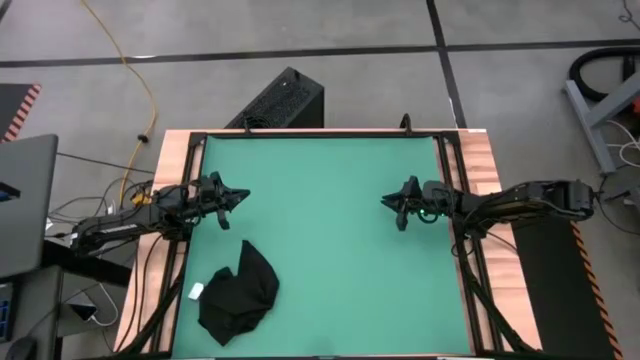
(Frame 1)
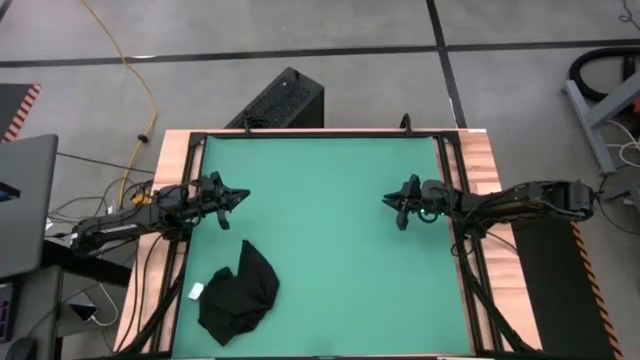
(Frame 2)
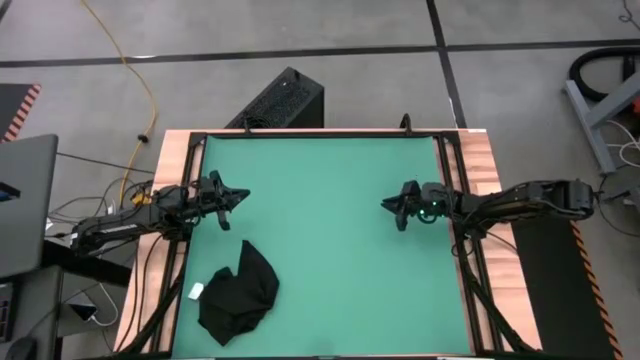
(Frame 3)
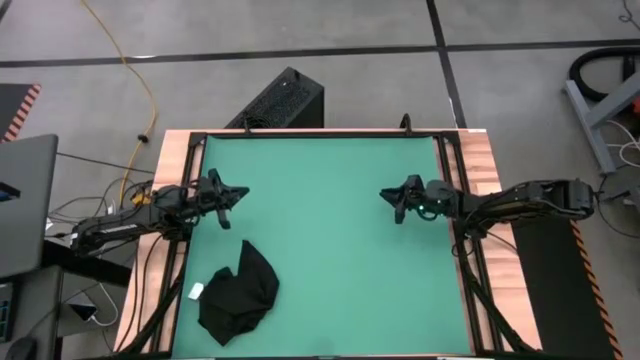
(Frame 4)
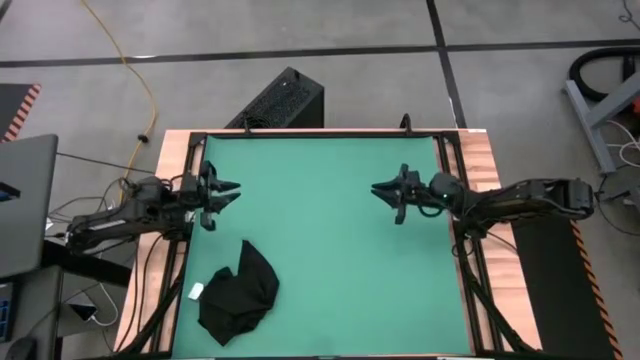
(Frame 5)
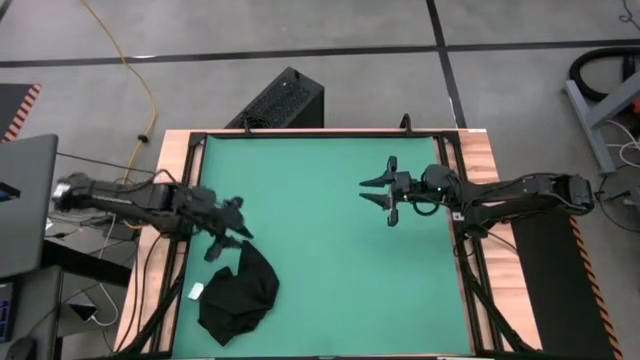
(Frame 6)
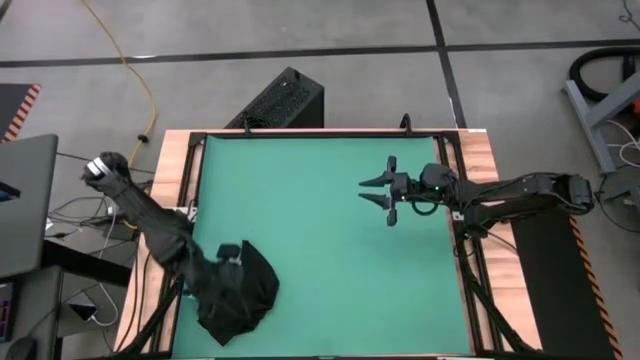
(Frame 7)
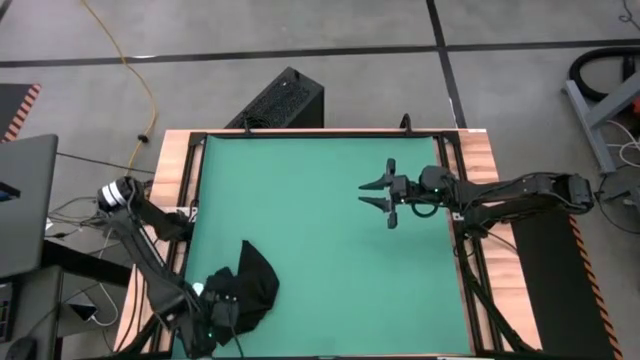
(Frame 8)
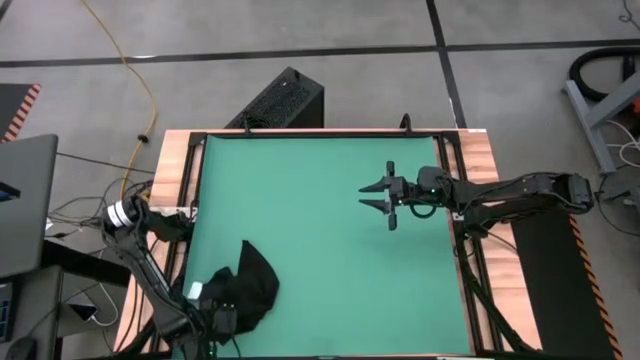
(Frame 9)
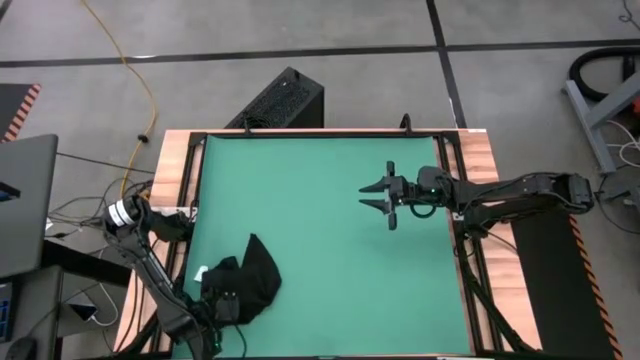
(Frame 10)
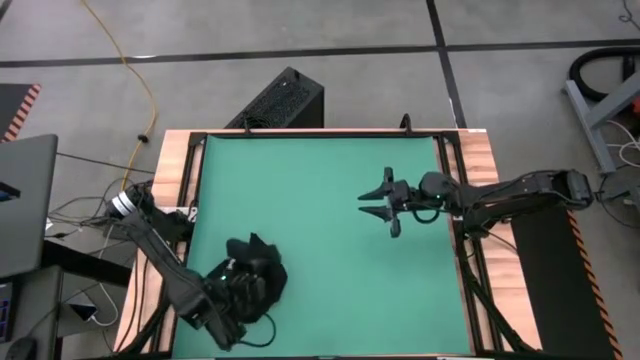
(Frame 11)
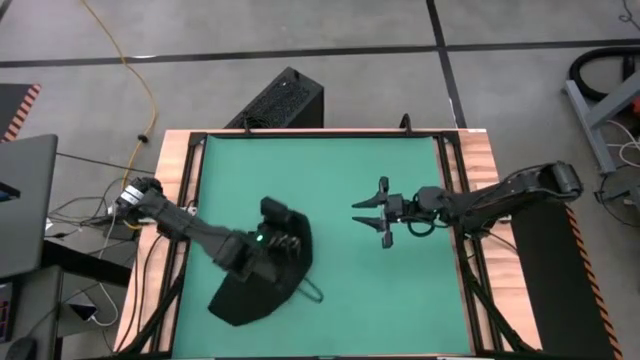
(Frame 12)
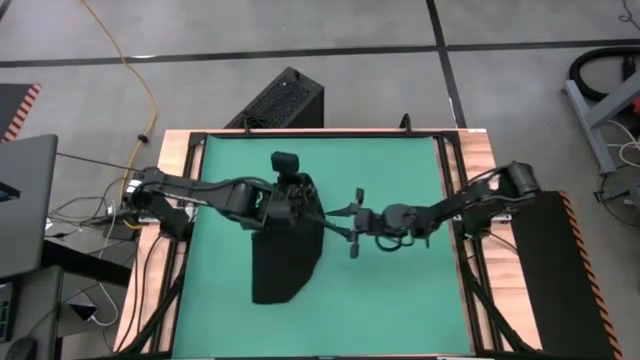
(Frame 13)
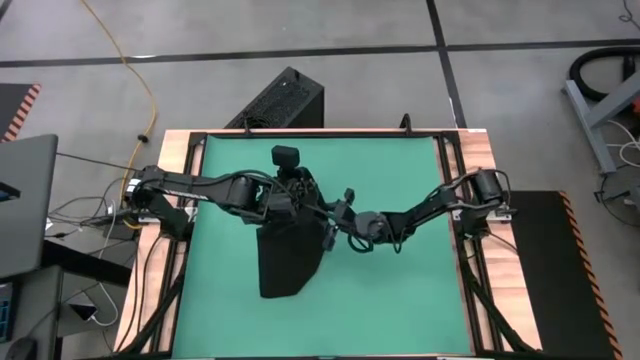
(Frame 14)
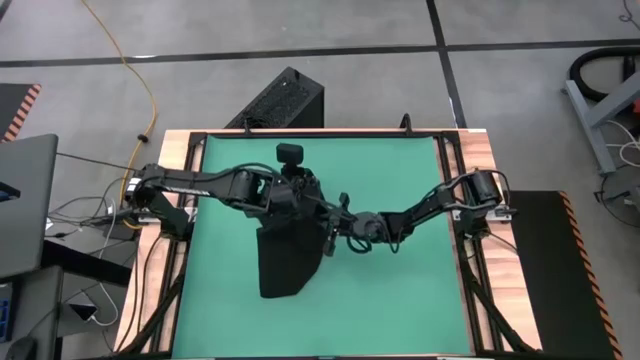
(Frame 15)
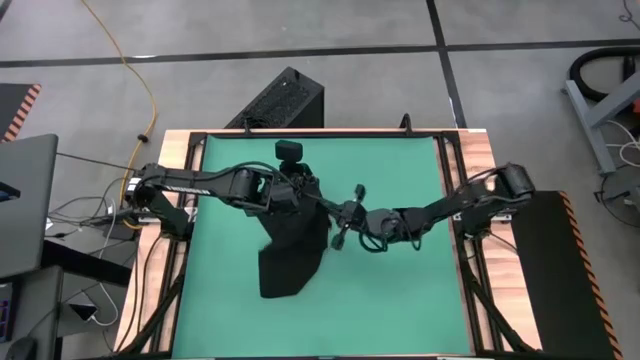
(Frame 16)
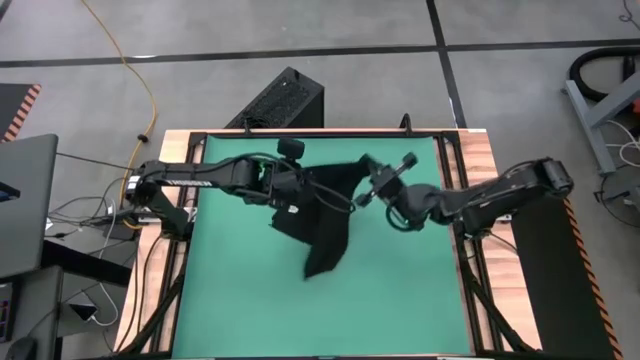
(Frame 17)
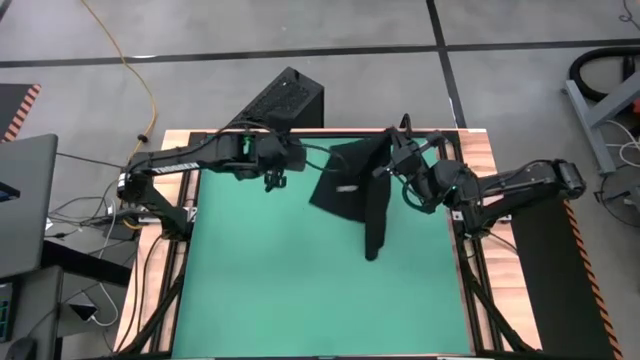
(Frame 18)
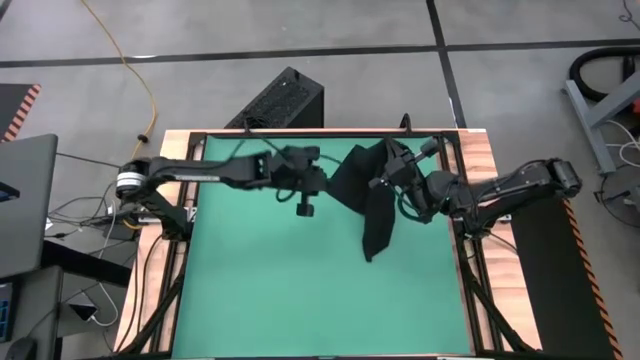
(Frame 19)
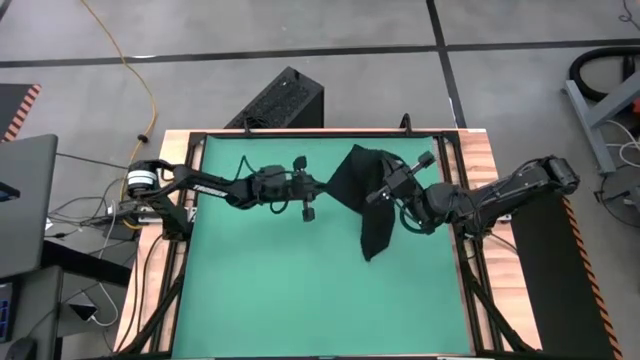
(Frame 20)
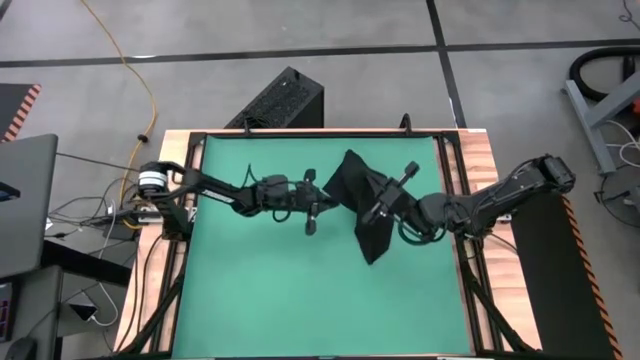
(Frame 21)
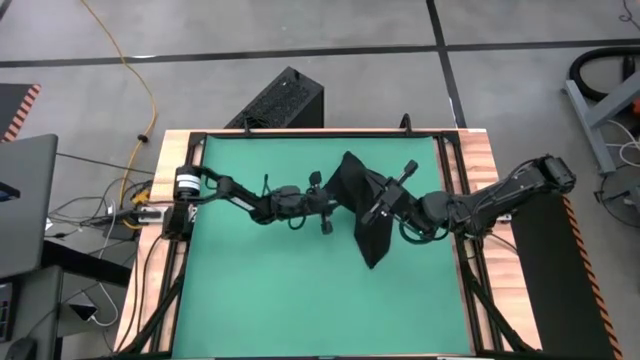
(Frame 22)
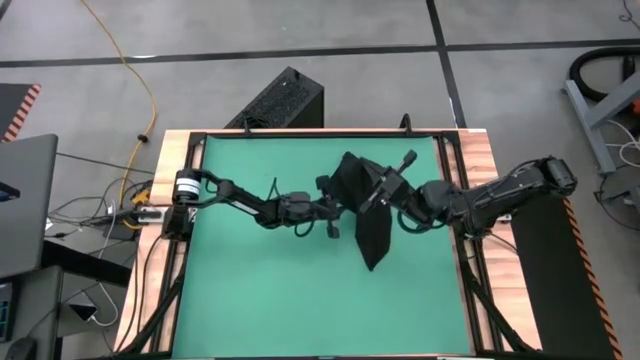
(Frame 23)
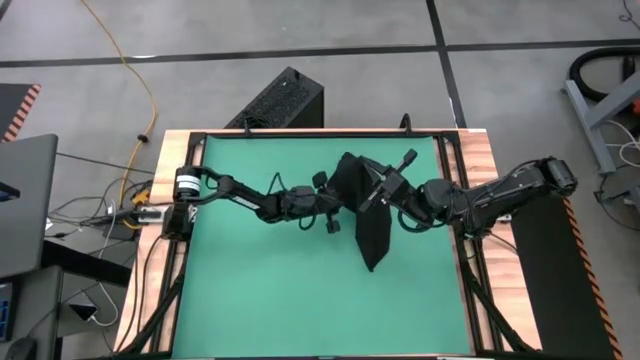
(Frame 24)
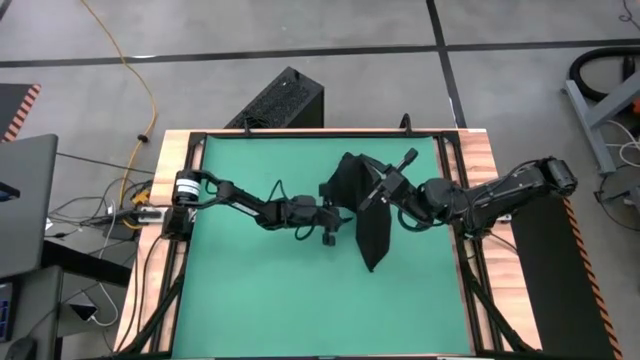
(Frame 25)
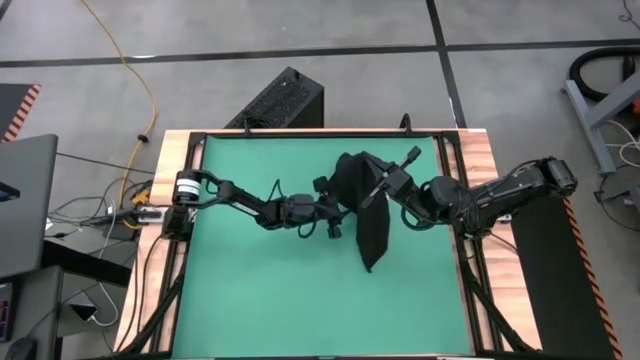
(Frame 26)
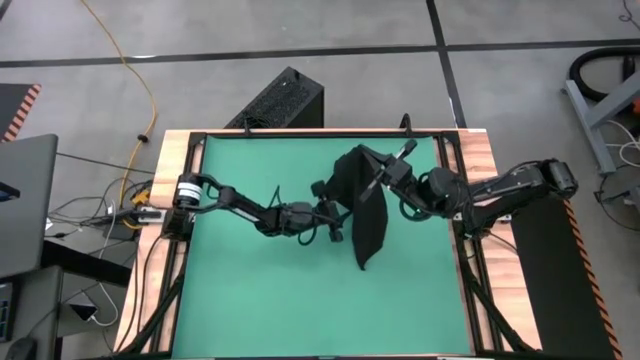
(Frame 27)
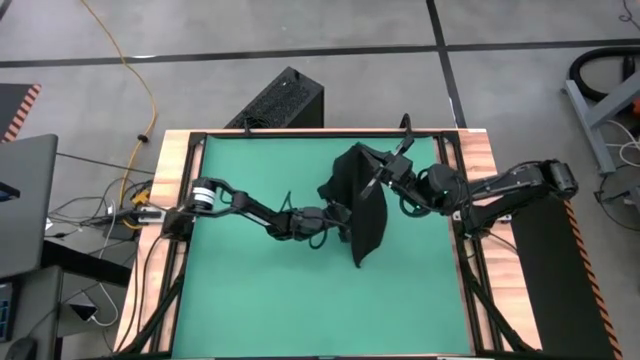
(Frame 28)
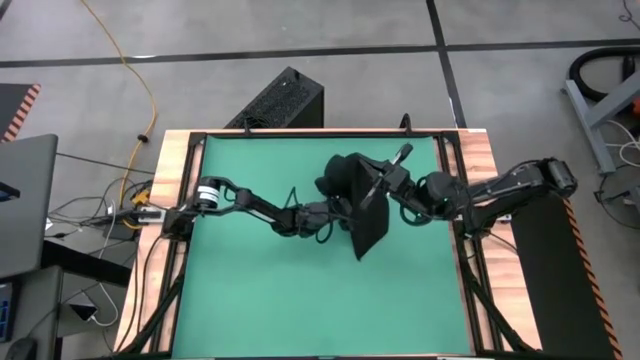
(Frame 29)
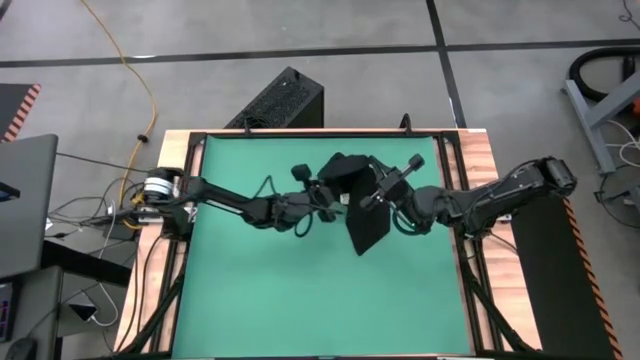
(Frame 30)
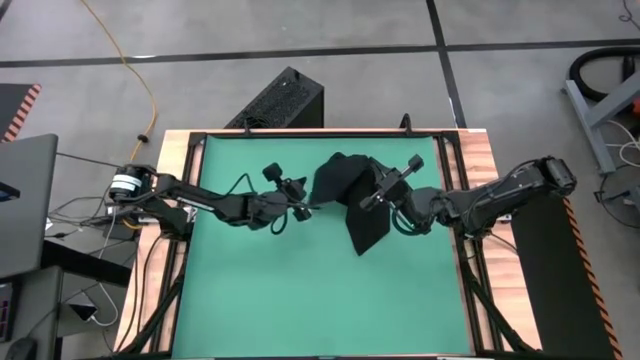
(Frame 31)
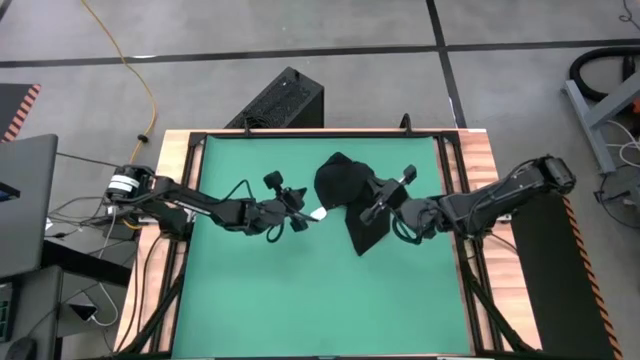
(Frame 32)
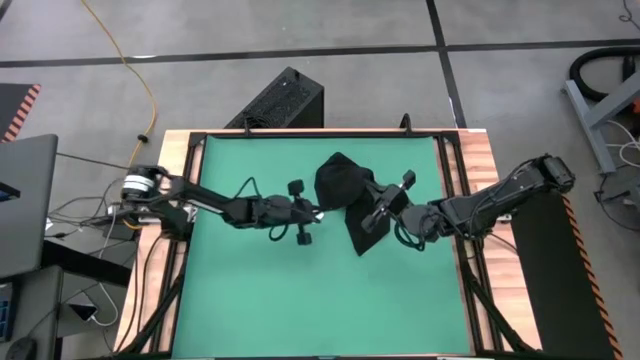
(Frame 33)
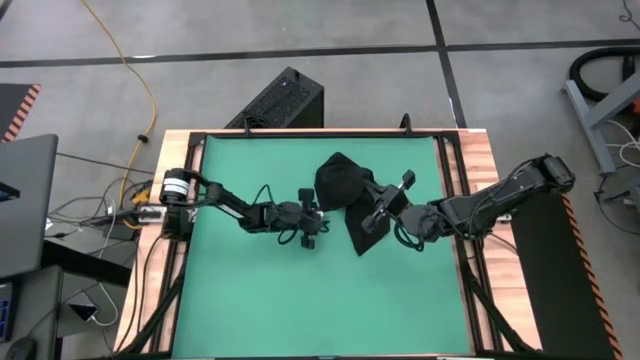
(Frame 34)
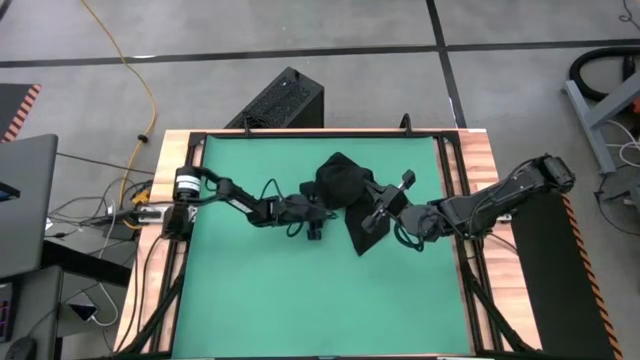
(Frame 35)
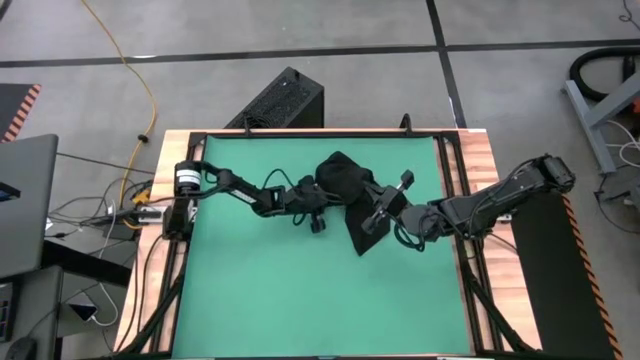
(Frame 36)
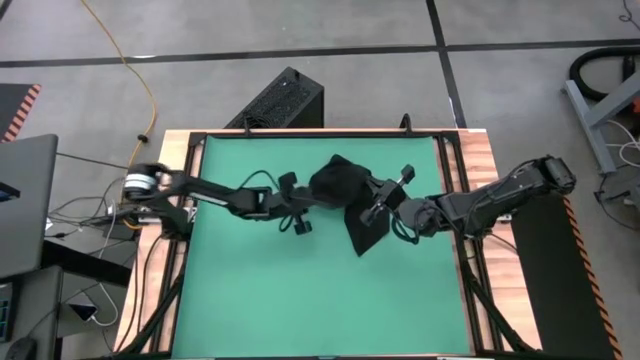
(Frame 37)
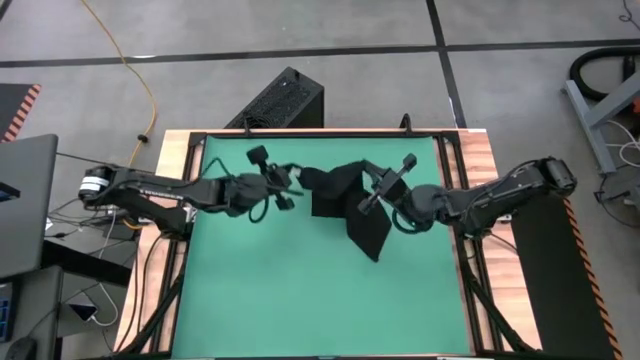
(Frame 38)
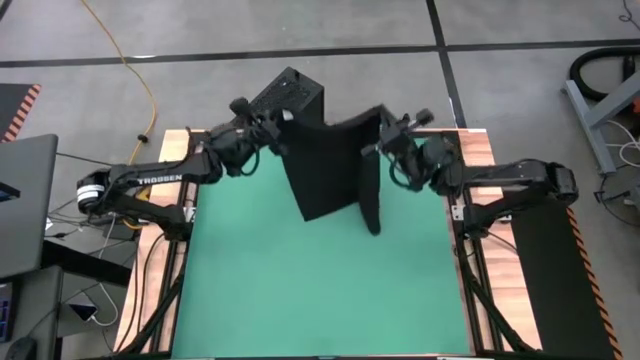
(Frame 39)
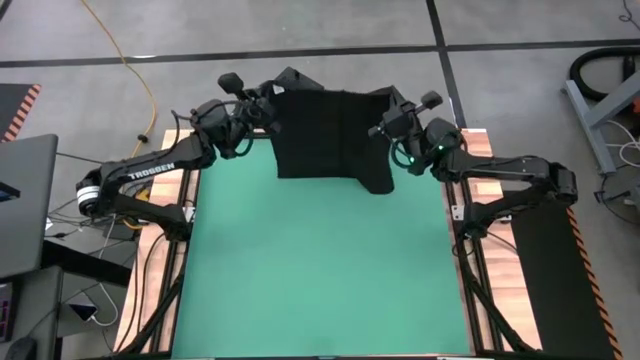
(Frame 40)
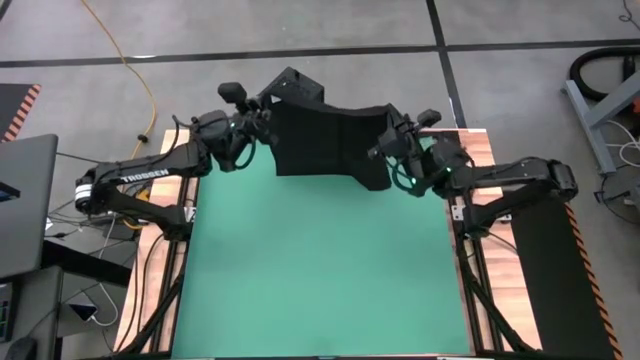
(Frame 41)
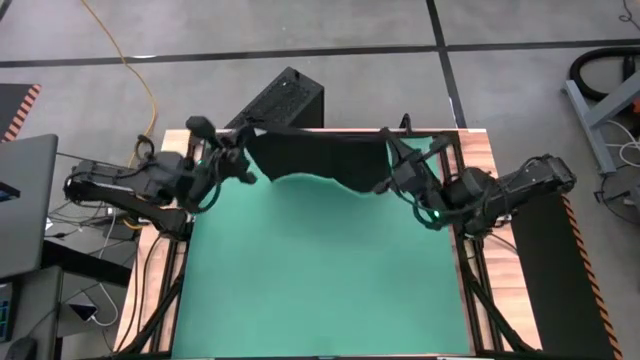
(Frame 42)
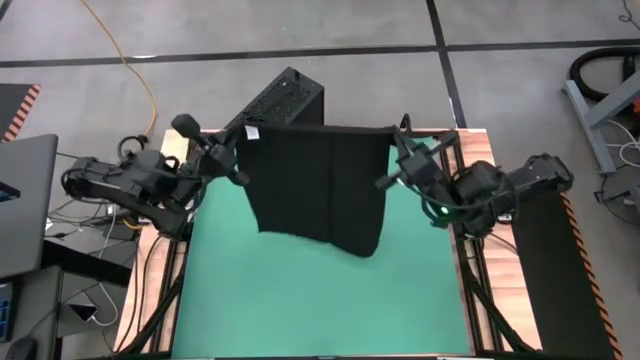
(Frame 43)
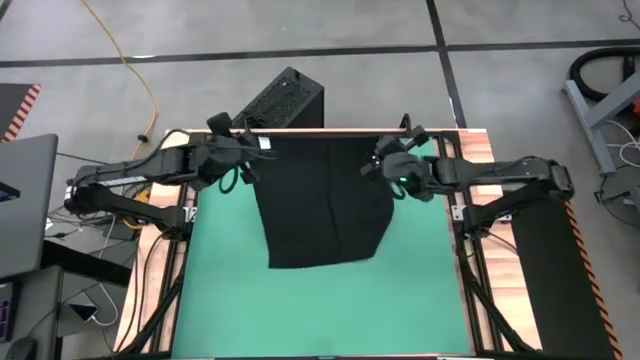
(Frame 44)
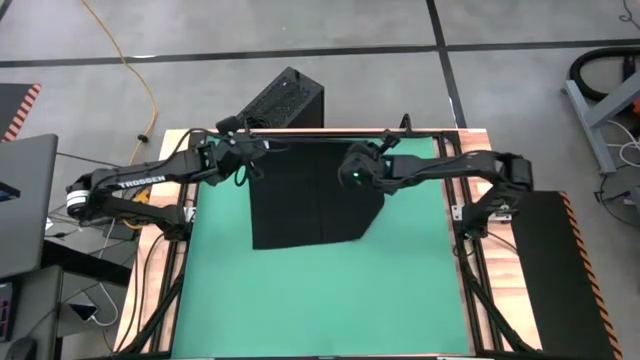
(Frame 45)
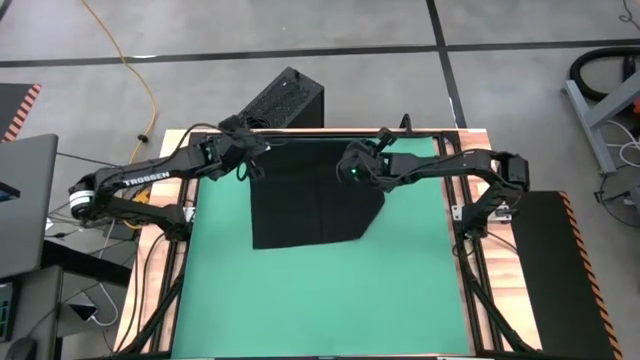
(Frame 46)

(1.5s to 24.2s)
Task: Roll towel into tight, uniform cylinder
Fold the black towel
